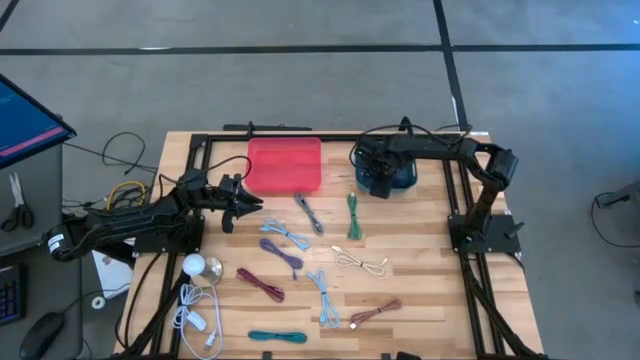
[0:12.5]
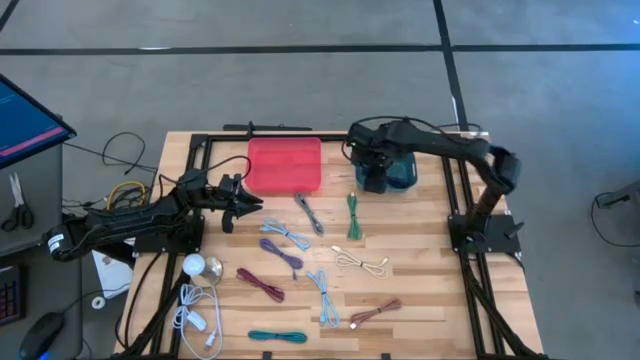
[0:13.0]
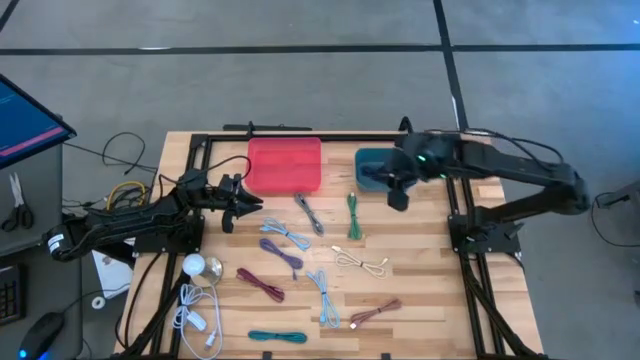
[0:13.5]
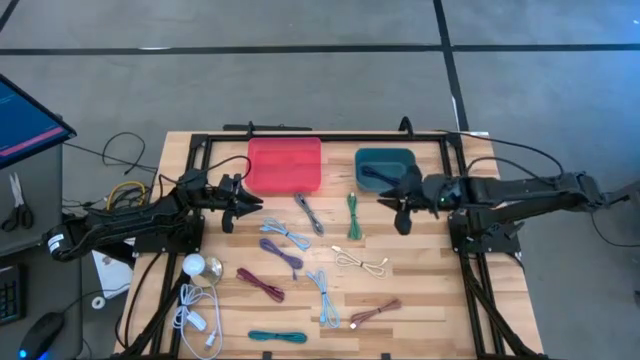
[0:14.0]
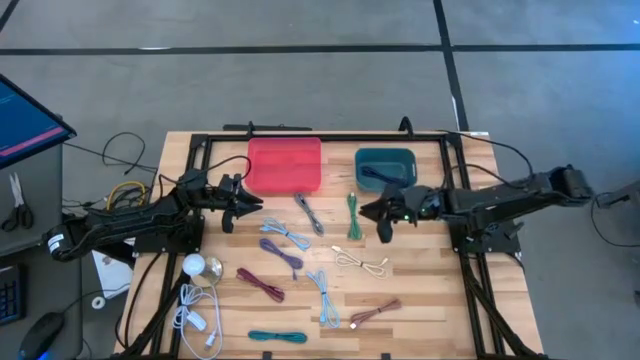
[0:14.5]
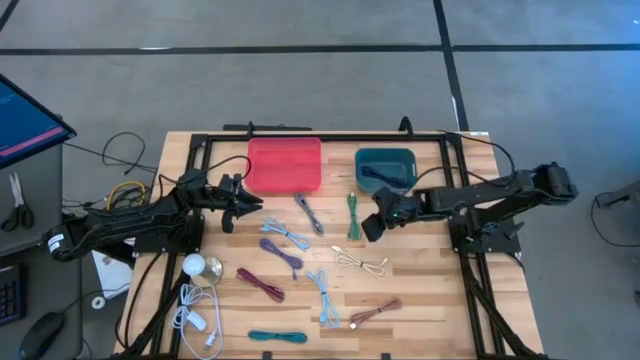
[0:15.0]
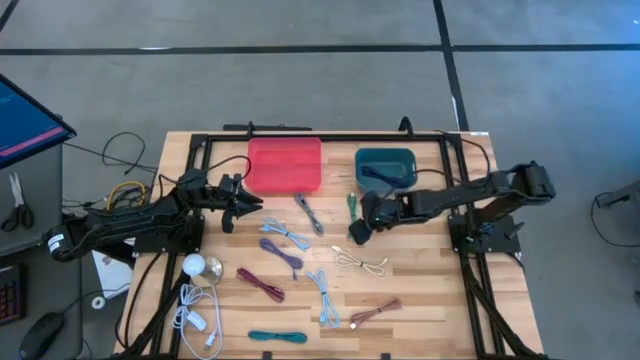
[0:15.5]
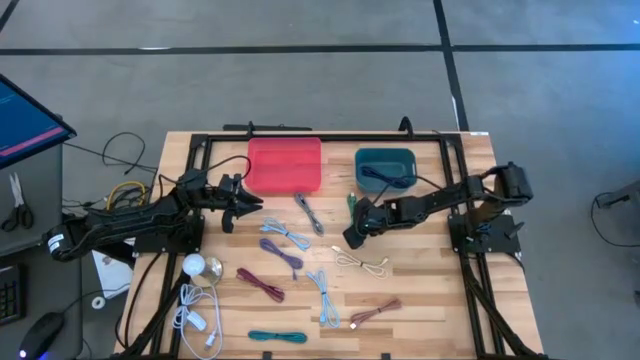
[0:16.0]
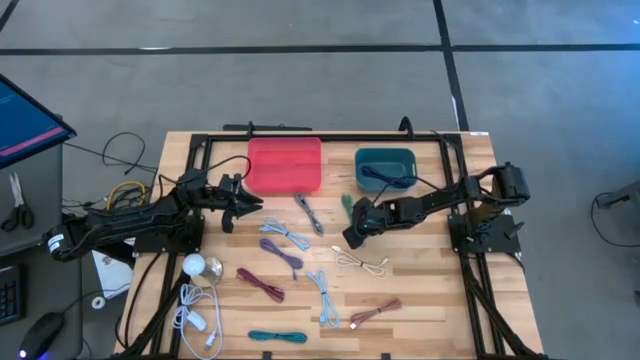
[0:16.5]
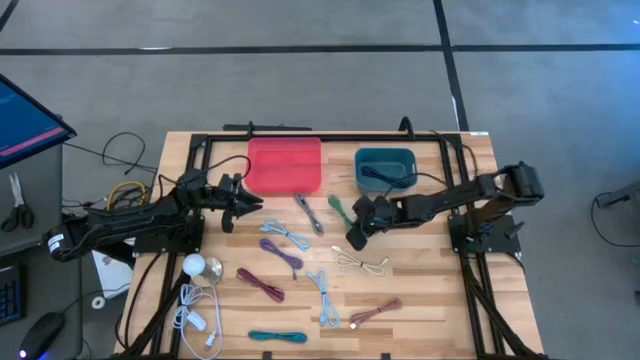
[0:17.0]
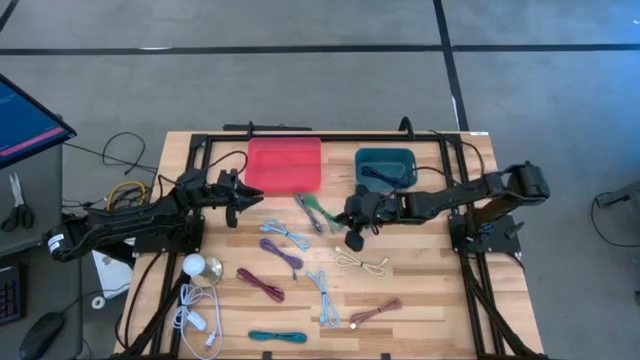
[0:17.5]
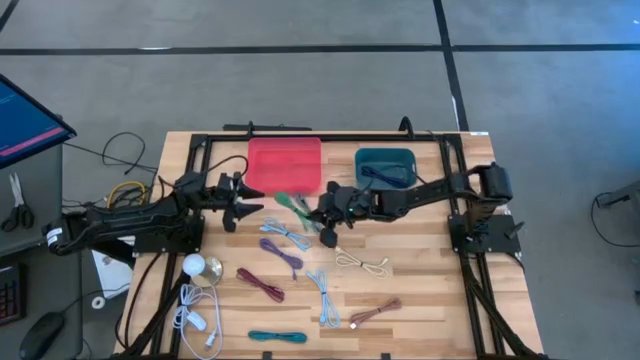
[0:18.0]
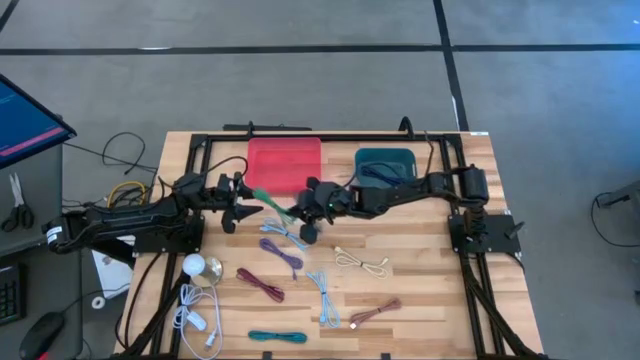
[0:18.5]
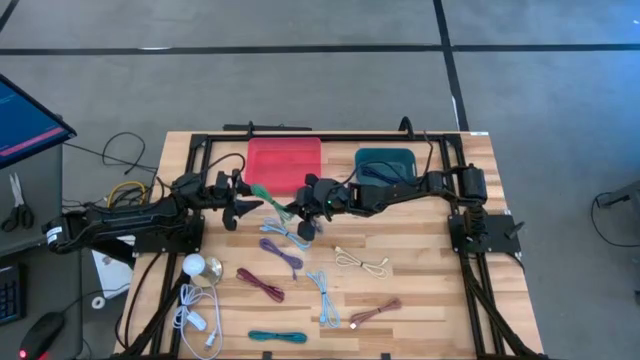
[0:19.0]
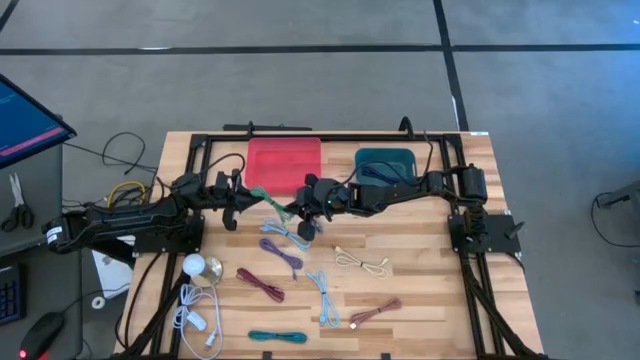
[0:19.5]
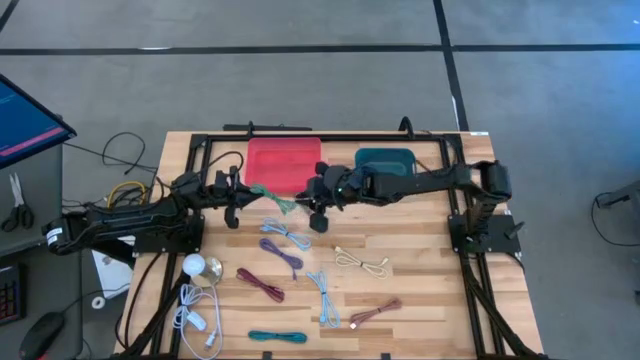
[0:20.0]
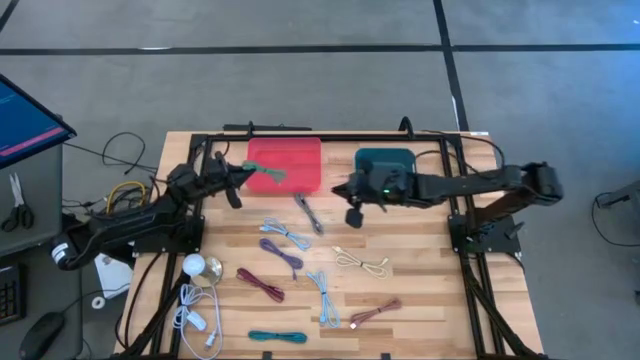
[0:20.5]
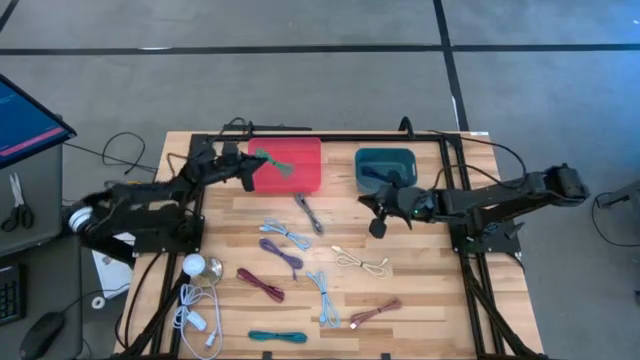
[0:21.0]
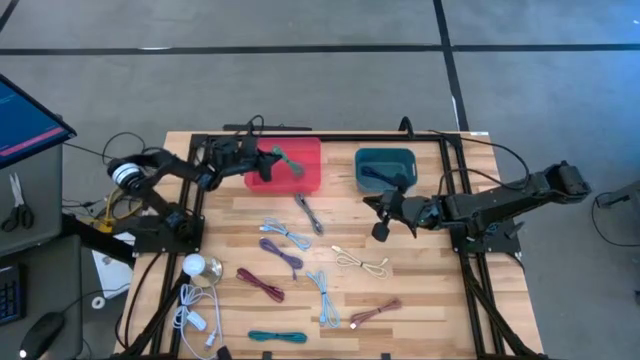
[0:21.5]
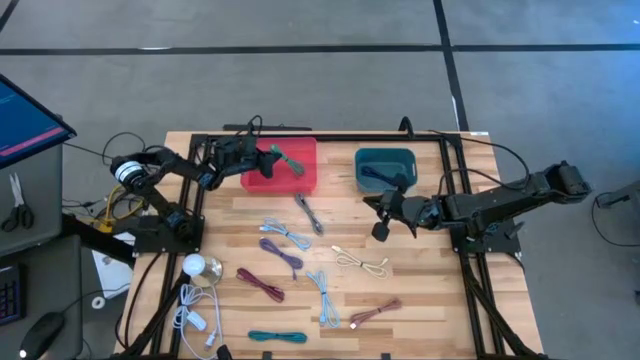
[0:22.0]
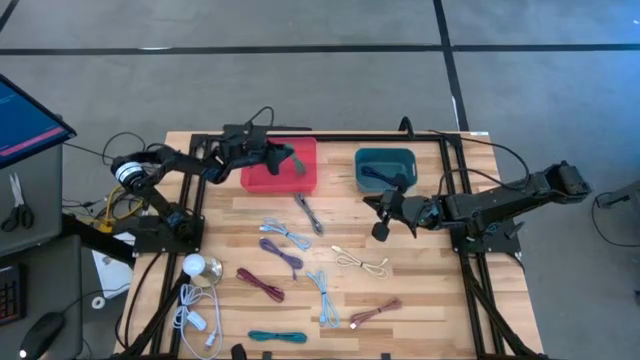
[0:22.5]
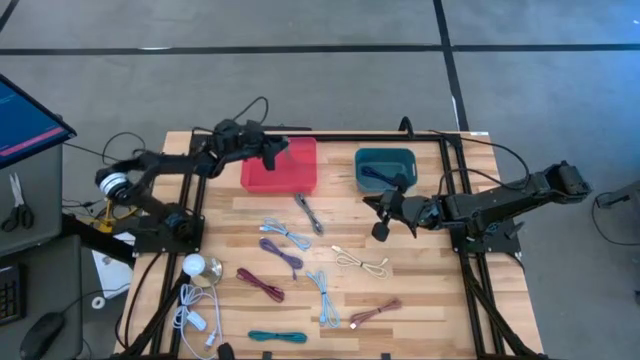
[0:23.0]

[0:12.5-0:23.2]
Task: Pick & Place USB Port
Put the green charger cable into the red bin

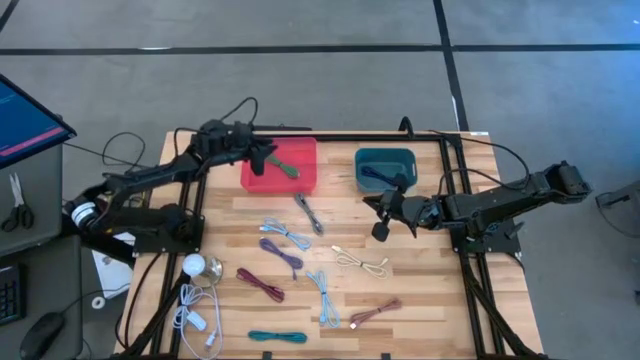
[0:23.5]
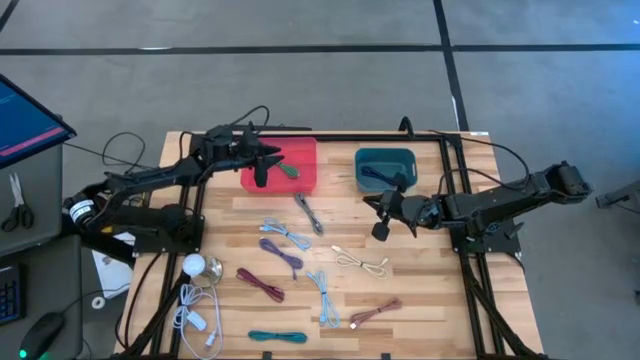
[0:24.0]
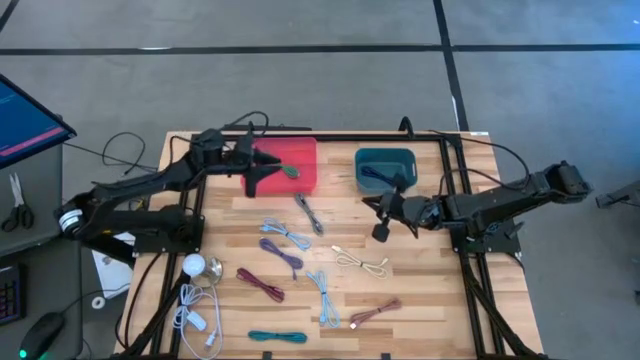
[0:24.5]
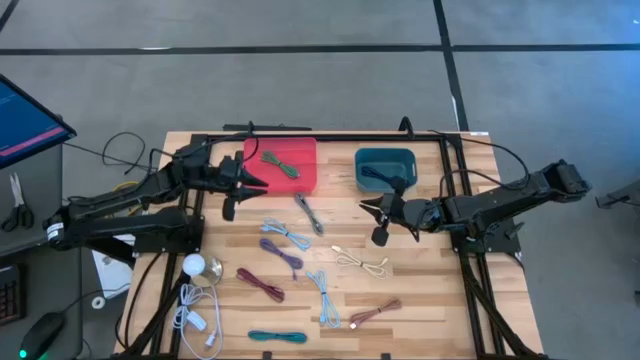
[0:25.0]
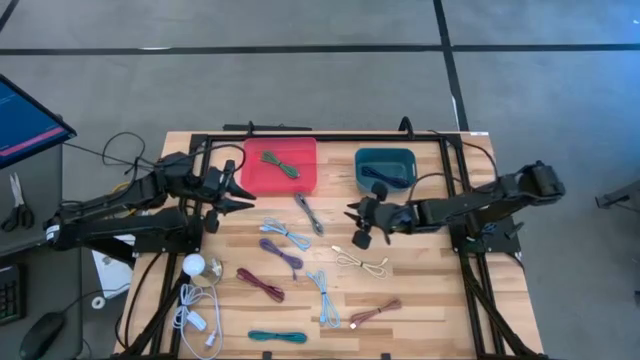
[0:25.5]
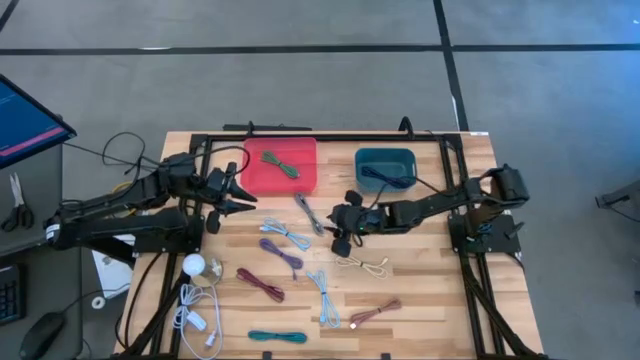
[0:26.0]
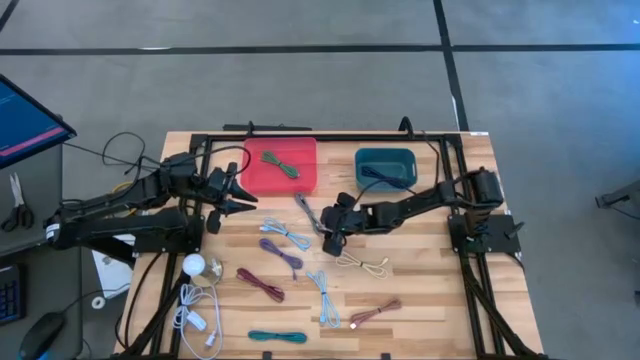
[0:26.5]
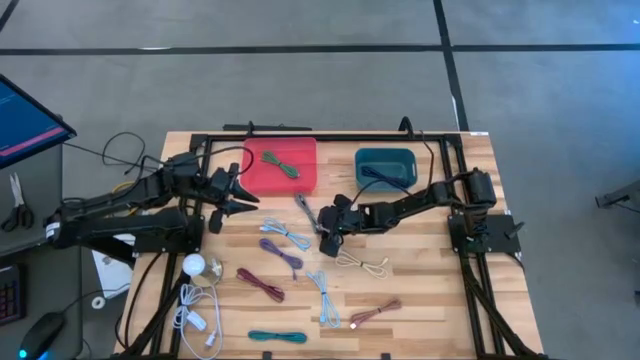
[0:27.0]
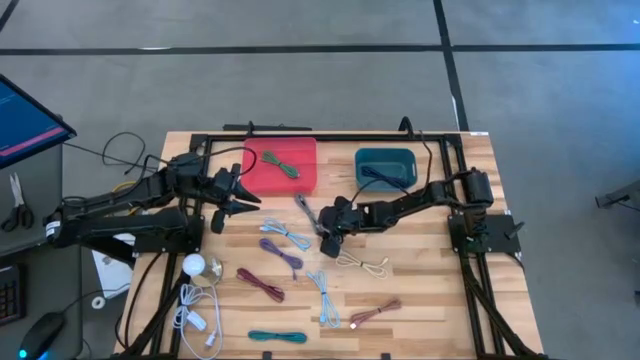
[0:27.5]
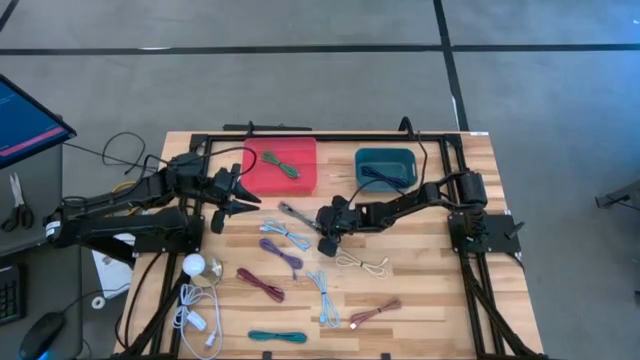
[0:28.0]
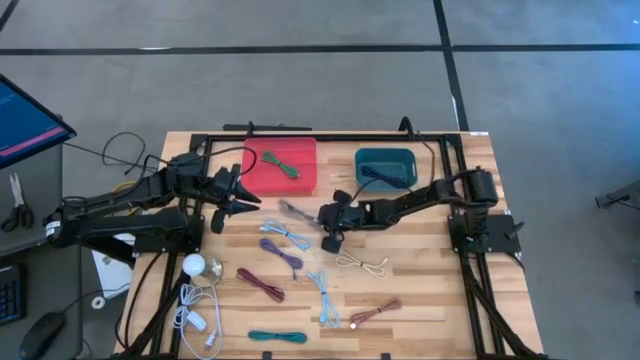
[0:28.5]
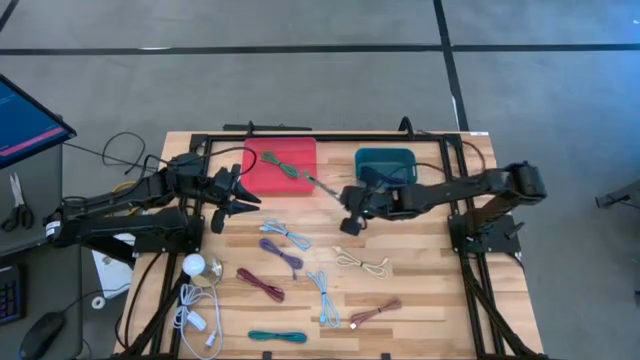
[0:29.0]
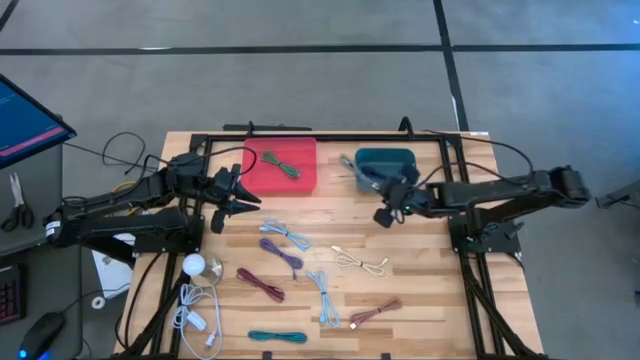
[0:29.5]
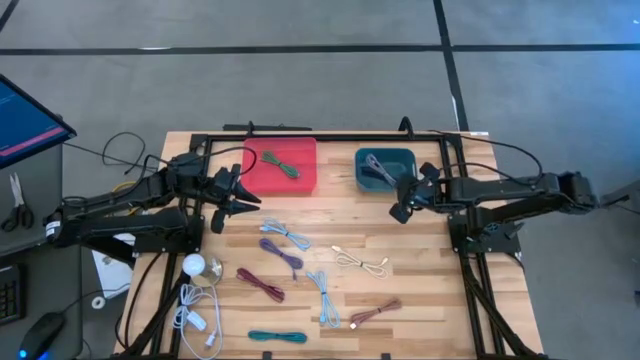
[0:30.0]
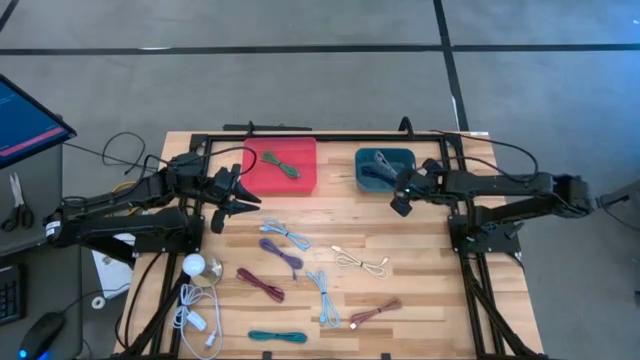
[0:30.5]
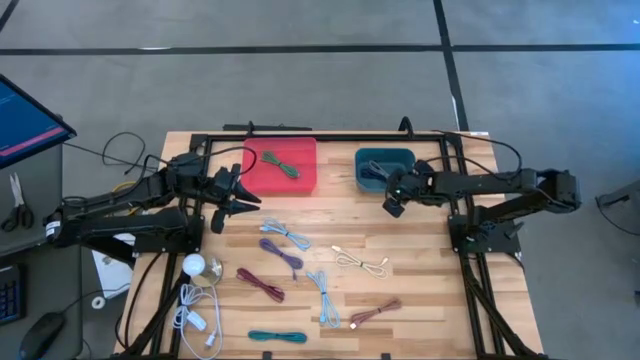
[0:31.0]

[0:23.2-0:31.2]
Put the black and white charger cable into the green bin

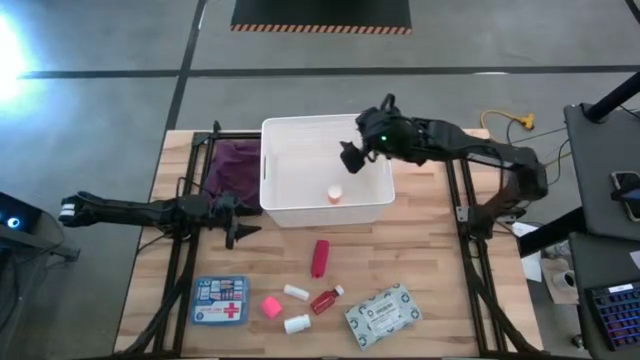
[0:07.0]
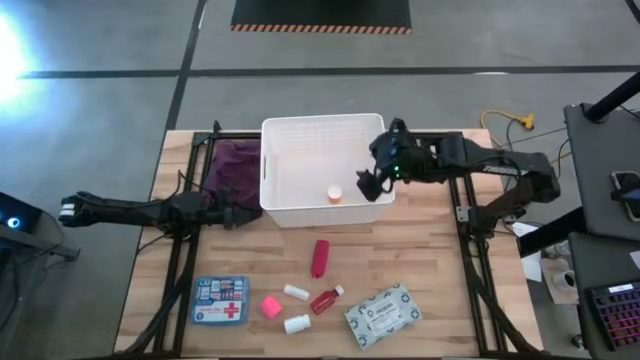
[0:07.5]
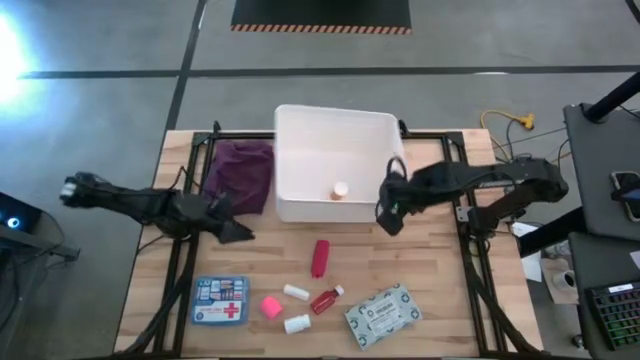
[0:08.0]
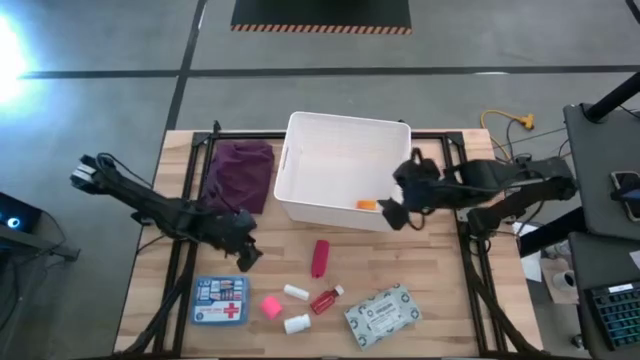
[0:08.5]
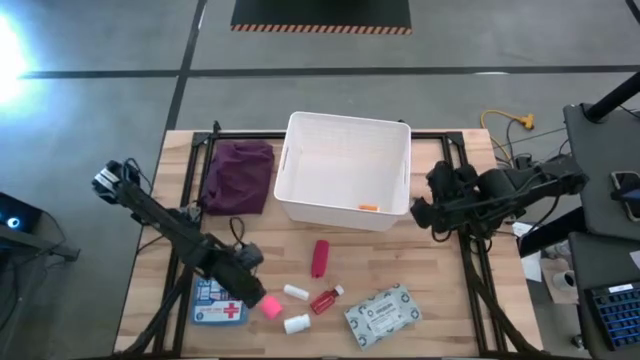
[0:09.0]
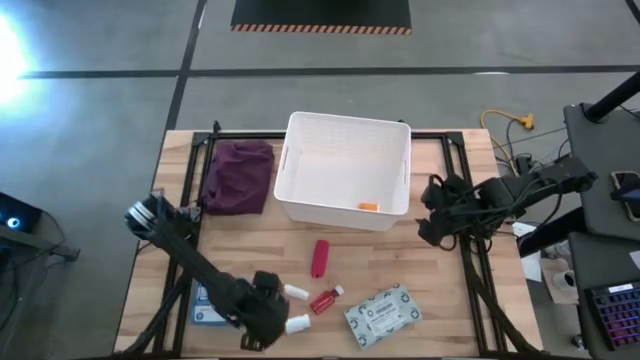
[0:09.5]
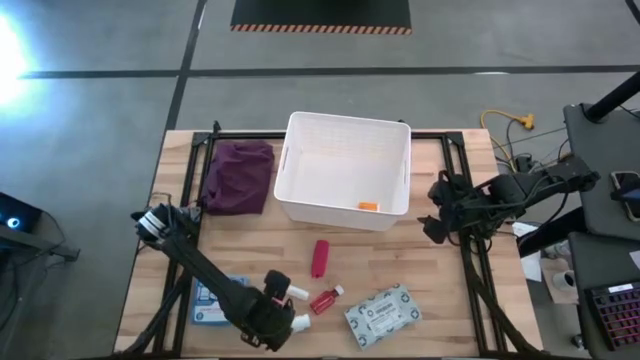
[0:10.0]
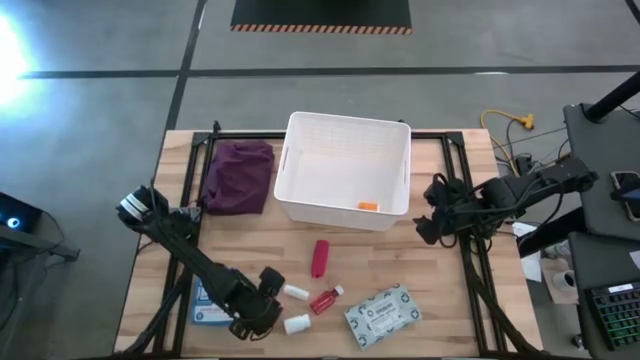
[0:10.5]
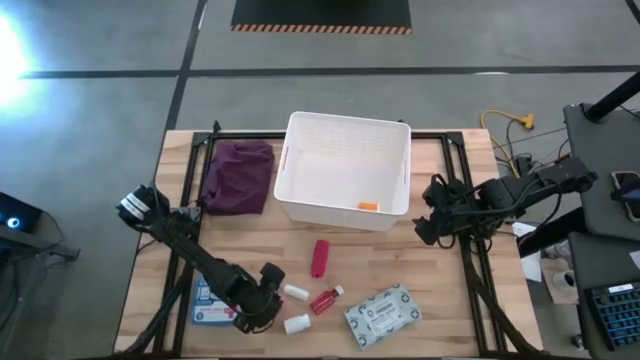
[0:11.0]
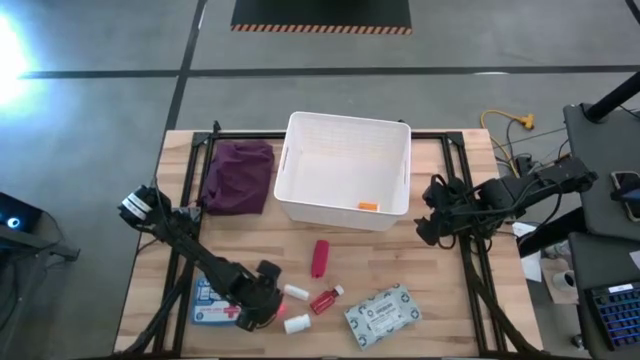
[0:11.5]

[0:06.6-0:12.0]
Task: Pick & place medical supplies in basket/bin
Put the pink bandage into the white bin
